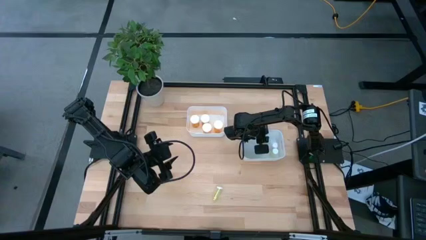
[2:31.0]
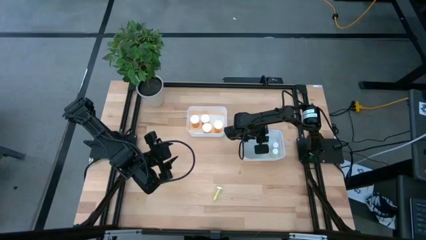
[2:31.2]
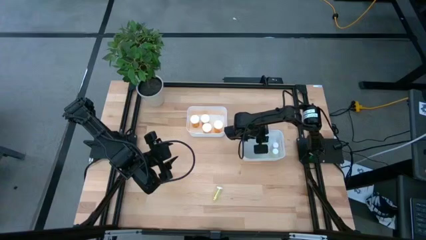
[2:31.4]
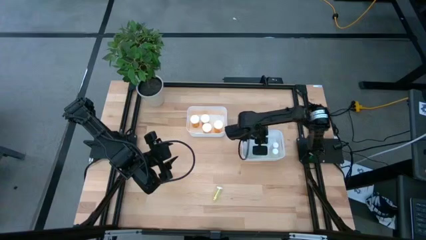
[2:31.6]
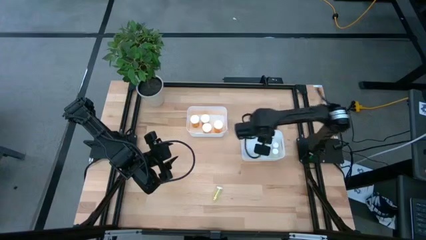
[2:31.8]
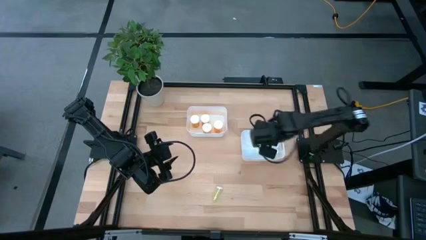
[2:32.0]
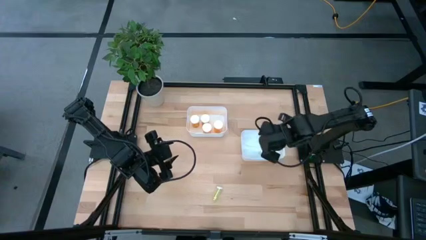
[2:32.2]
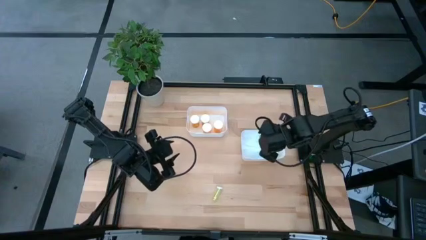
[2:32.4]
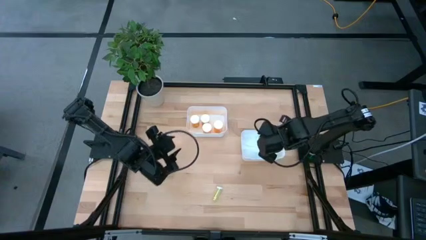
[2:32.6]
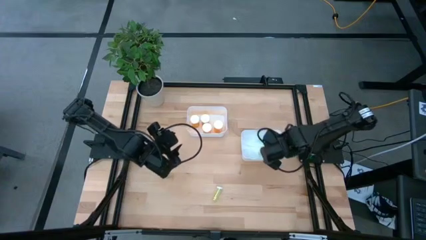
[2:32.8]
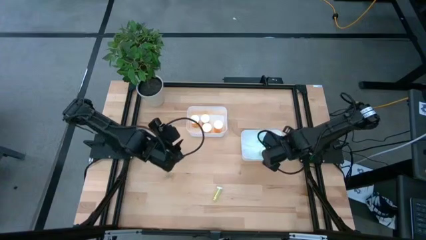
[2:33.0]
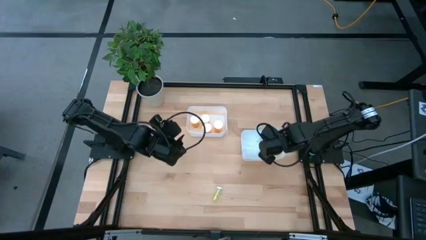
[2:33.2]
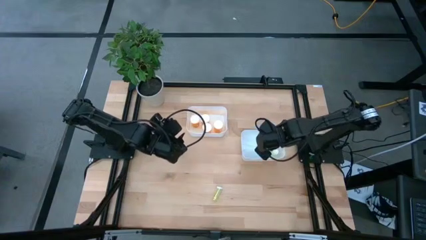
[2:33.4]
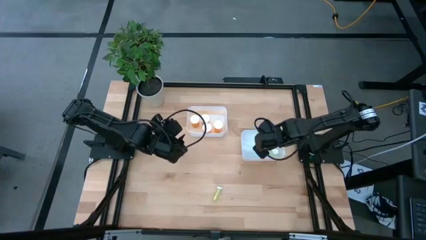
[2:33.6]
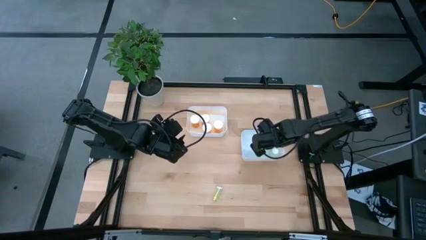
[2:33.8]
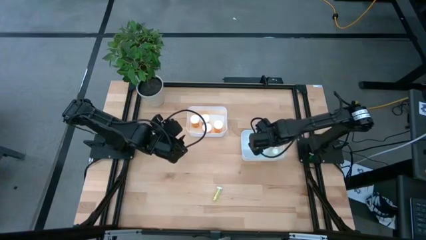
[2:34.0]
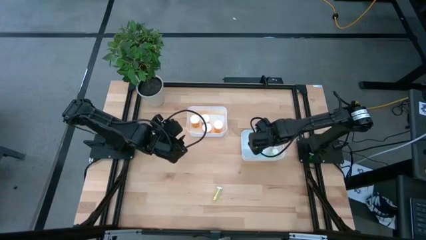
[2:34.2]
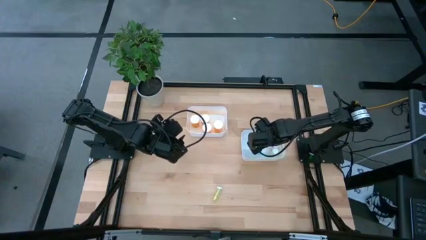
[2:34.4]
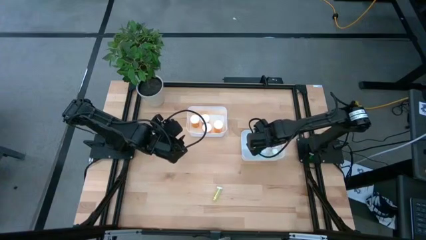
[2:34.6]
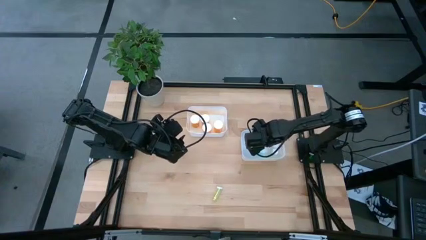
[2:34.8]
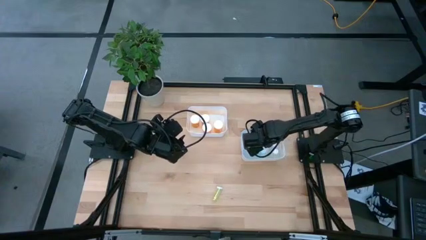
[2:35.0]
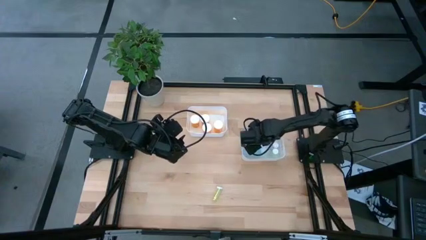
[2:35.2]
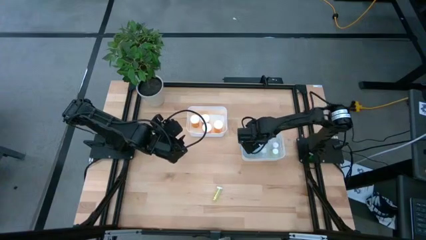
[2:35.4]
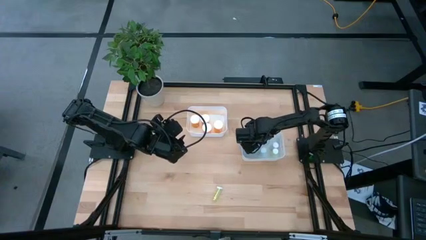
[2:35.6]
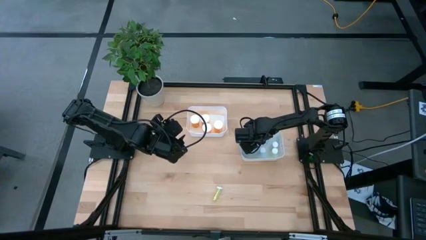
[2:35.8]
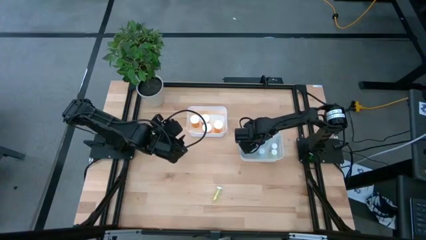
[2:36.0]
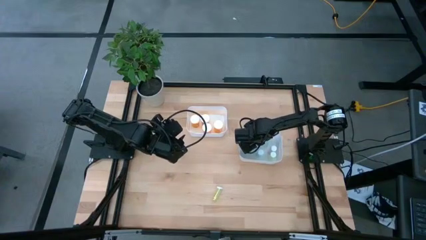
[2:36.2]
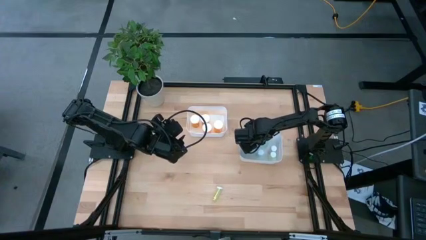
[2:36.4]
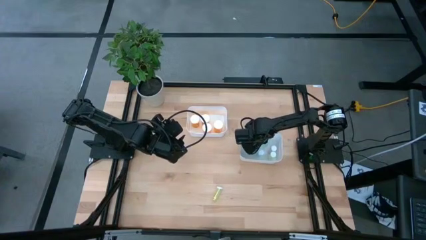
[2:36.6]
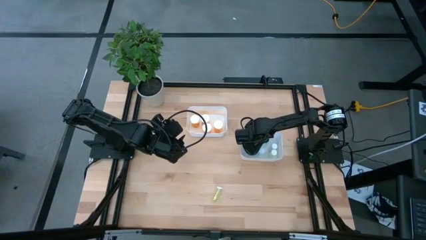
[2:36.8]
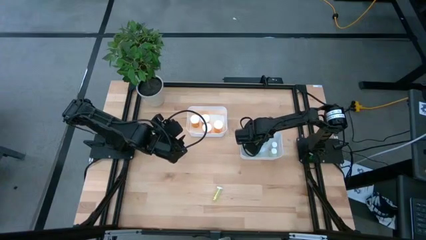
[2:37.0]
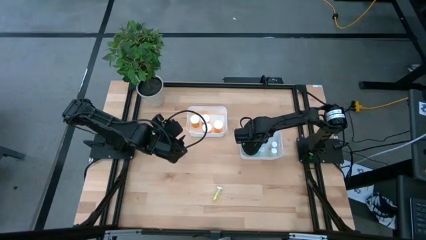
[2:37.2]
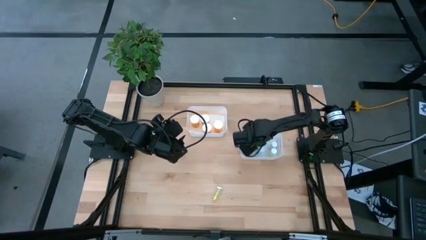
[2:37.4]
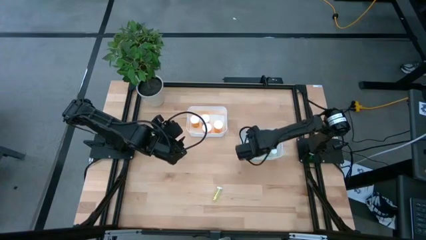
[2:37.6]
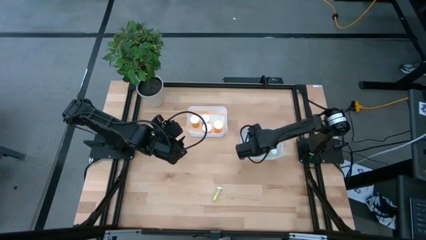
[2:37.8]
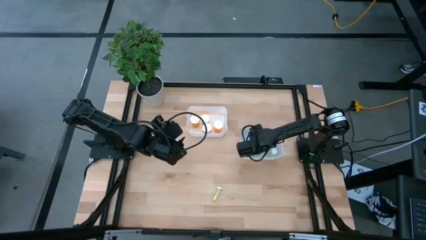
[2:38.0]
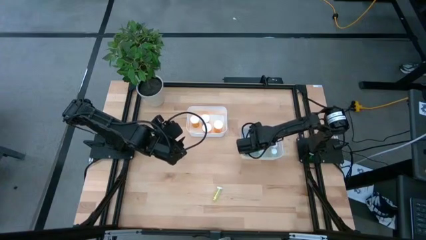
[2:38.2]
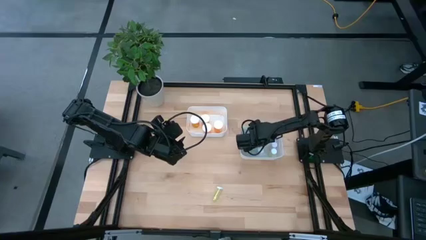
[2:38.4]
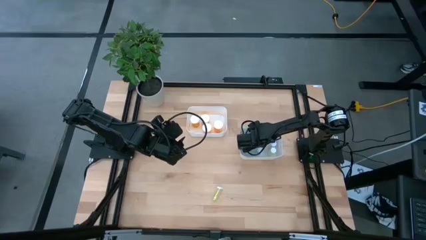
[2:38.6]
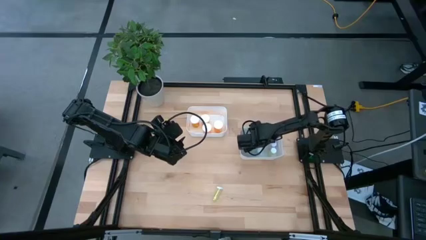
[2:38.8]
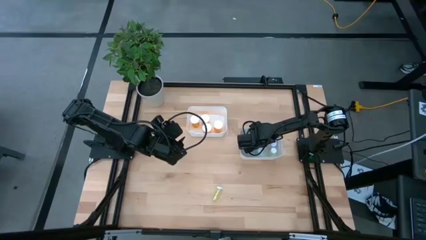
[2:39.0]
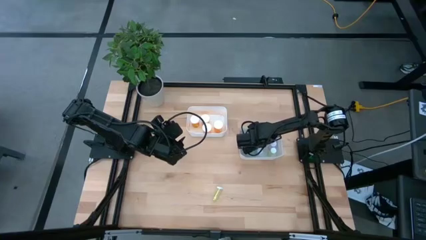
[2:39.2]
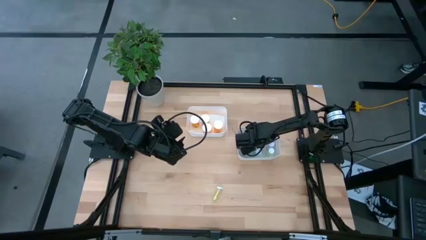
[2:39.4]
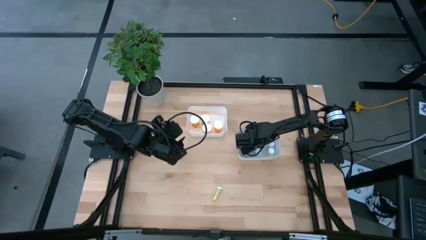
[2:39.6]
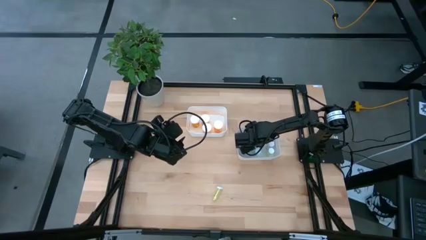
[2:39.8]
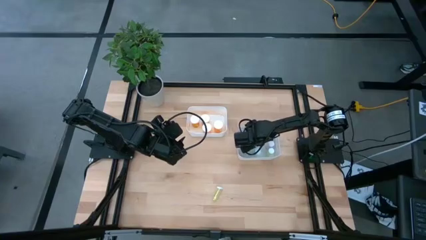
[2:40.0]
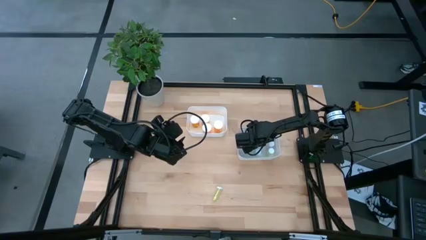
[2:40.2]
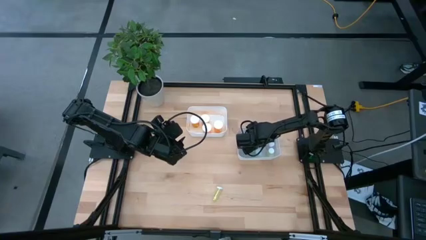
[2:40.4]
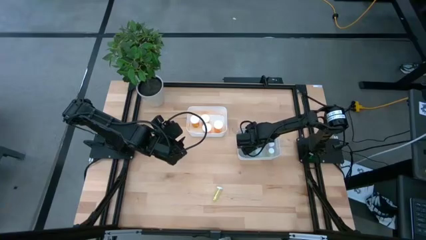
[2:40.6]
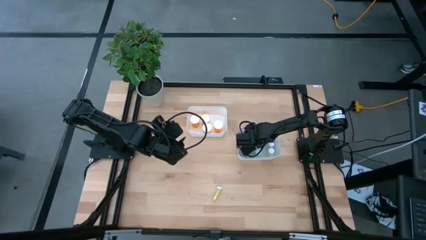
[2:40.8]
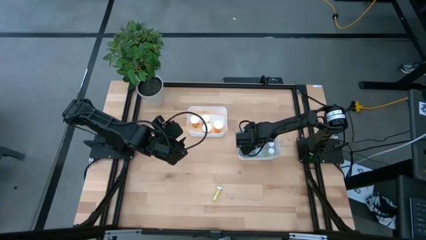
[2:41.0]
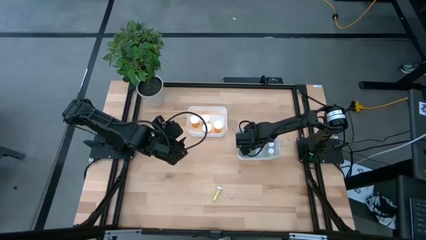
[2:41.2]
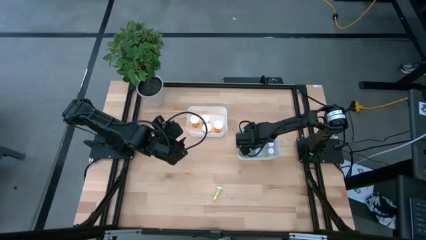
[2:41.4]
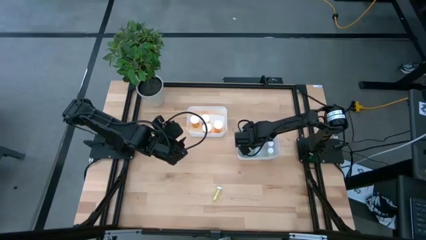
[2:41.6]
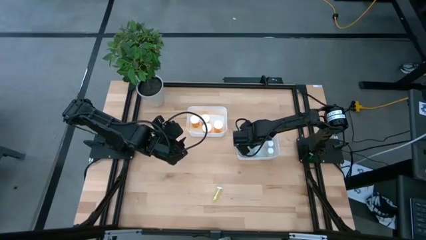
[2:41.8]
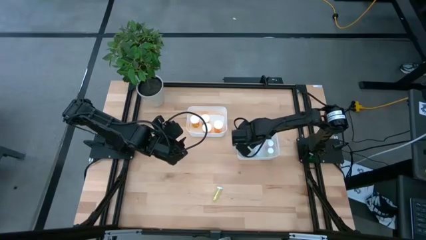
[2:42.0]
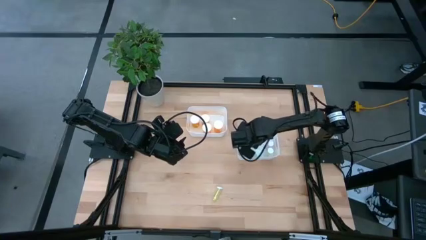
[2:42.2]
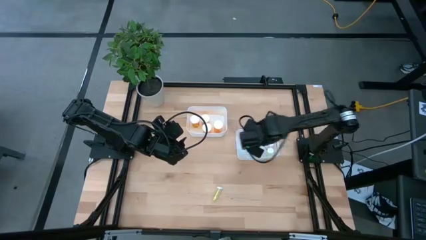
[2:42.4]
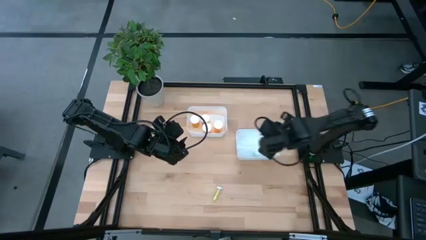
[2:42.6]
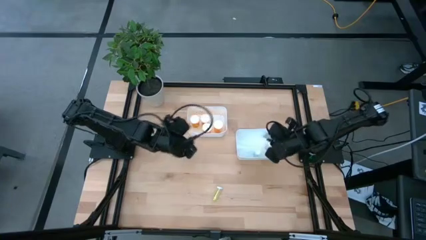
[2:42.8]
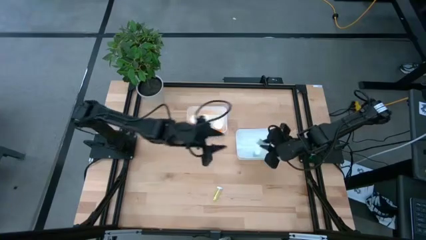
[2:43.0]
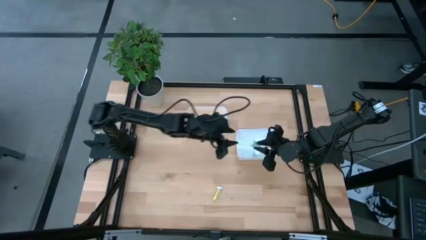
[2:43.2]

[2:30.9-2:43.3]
Task: Pick and place medicine bottles into bin by pill shape (circle, oval)
Put the small blue pill bottle into the bottom white bin

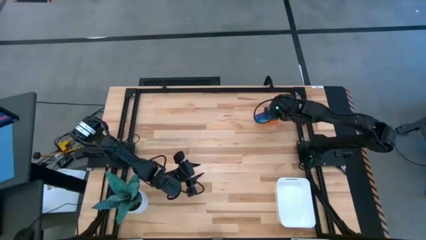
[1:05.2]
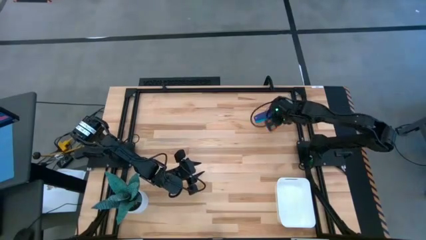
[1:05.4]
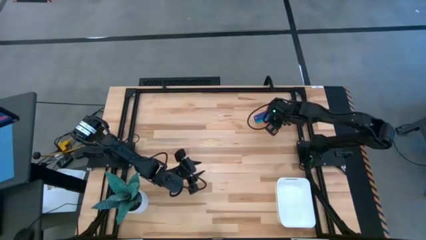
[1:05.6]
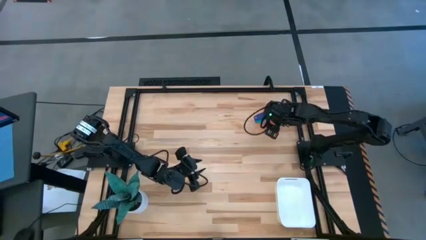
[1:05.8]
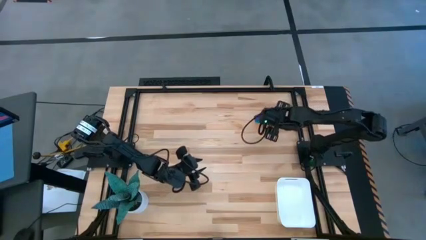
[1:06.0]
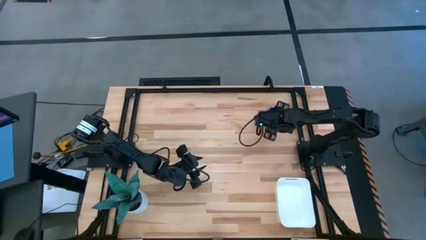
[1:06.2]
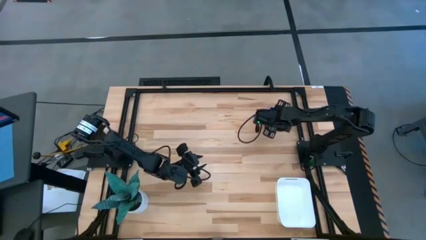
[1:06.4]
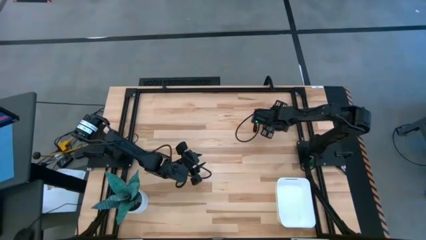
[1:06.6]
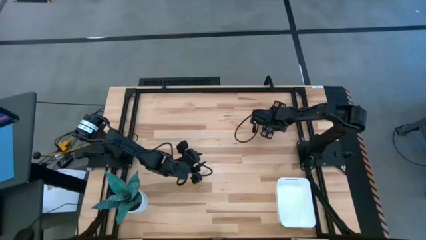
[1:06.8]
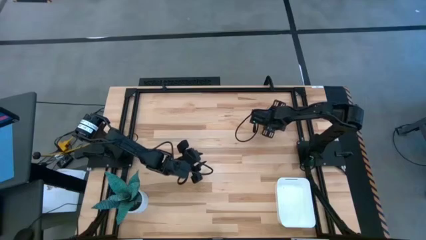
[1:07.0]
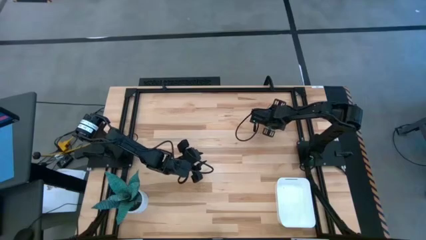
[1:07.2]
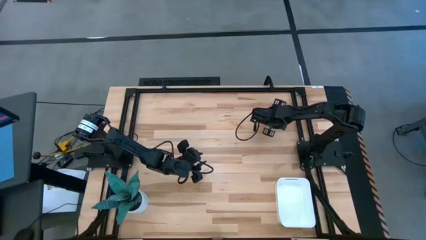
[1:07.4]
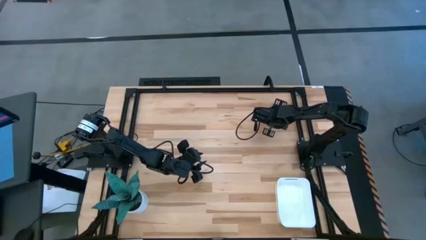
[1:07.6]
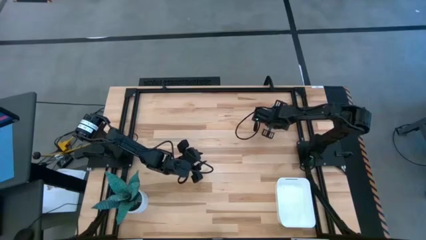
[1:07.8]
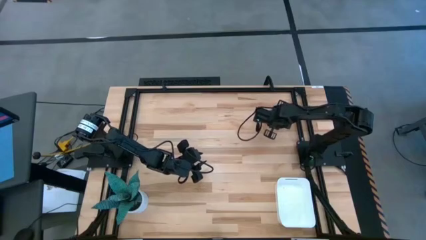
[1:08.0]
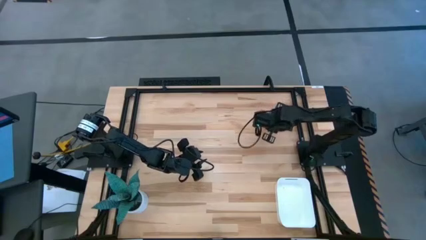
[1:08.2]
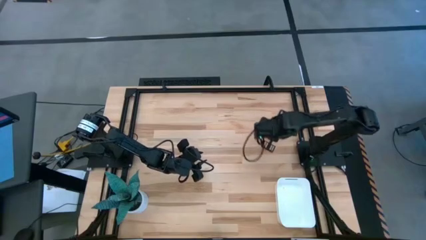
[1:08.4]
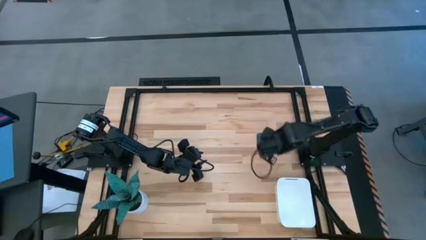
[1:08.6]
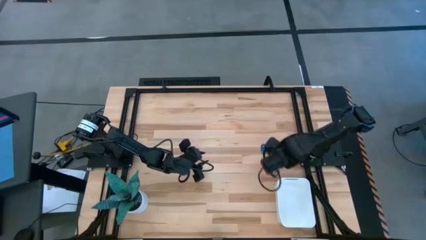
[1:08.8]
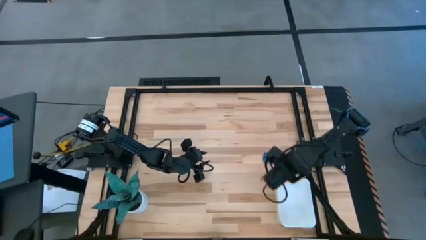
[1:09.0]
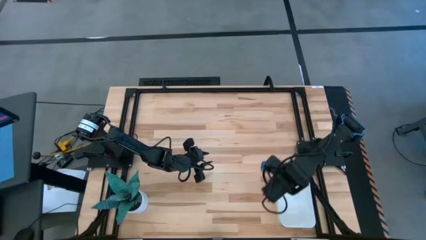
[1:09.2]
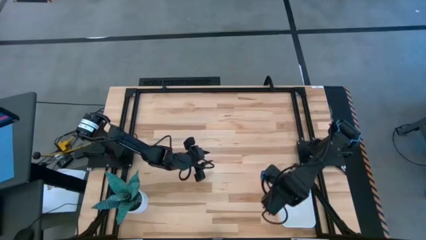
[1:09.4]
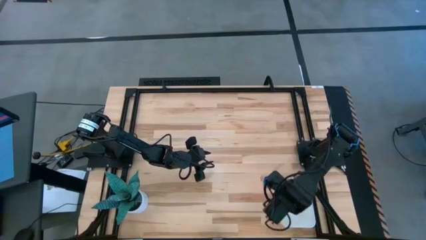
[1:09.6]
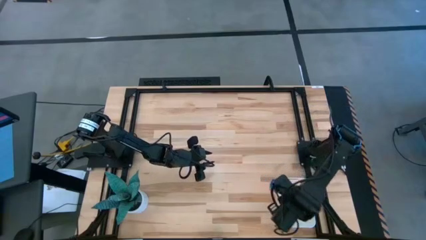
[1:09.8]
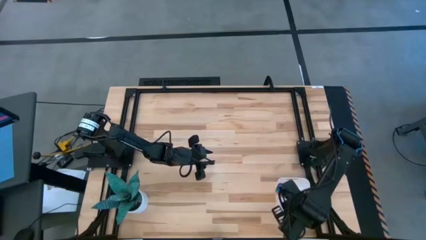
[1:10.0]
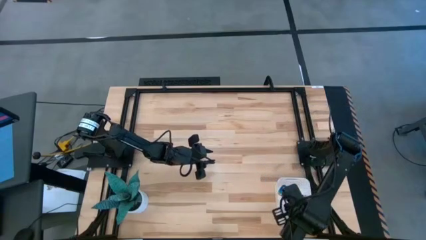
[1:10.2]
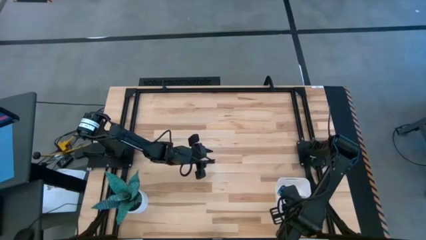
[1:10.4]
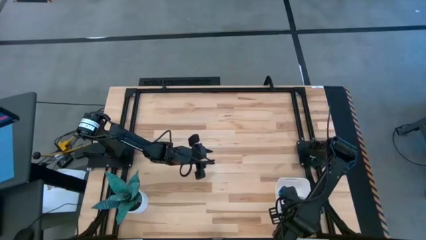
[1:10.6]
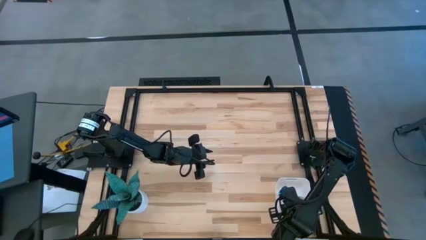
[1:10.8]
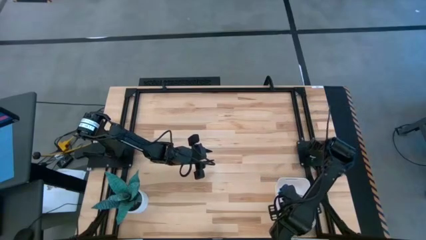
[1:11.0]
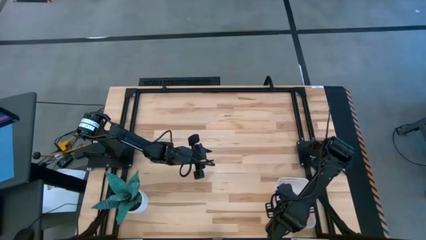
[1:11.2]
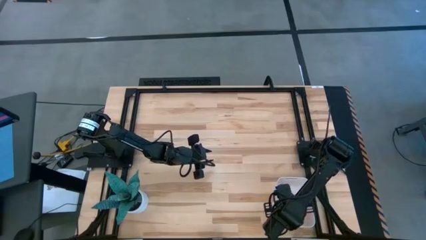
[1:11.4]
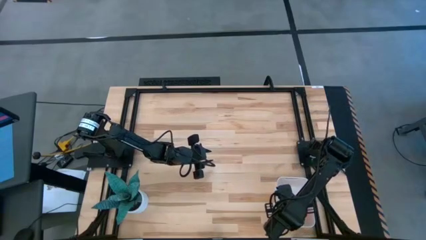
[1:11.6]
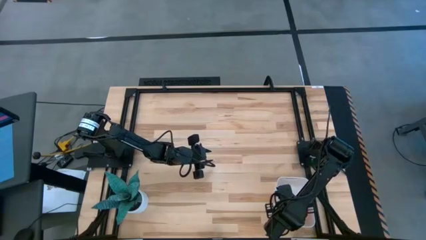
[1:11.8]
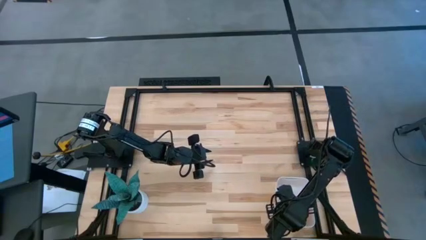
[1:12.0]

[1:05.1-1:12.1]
Task: Nest measuring cups in basket
Put the stacked measuring cups into the white bin
